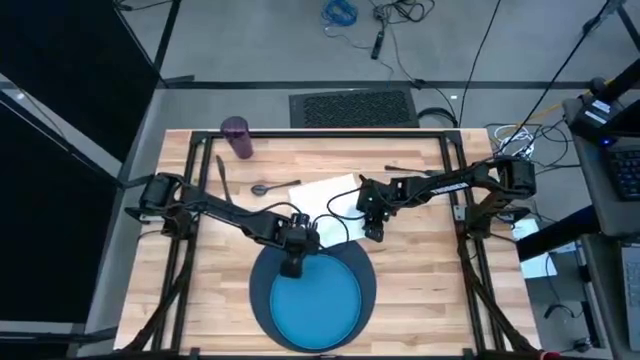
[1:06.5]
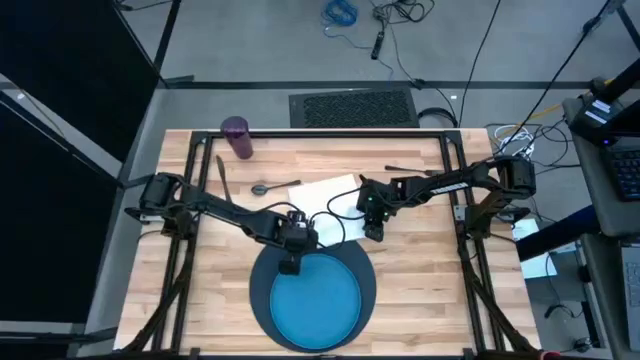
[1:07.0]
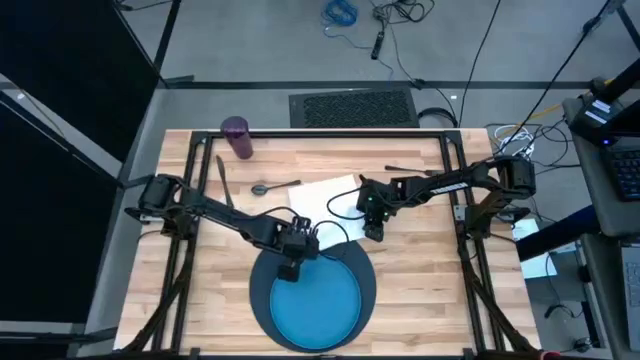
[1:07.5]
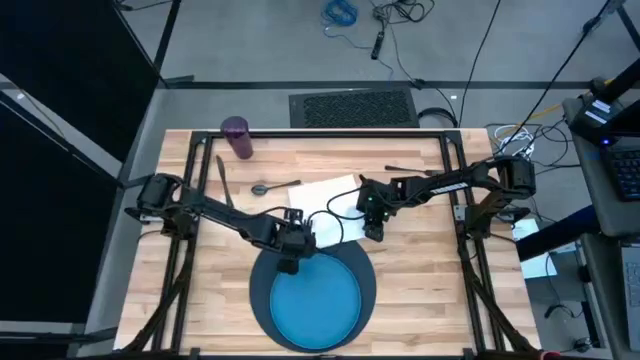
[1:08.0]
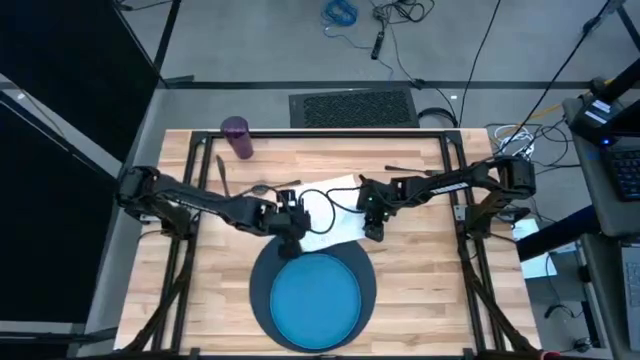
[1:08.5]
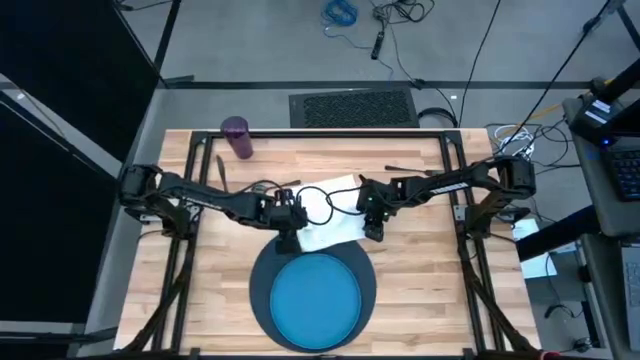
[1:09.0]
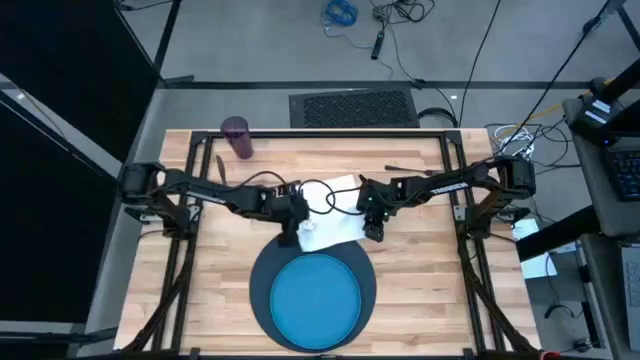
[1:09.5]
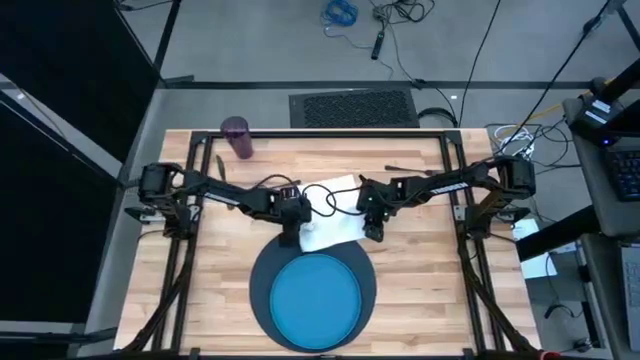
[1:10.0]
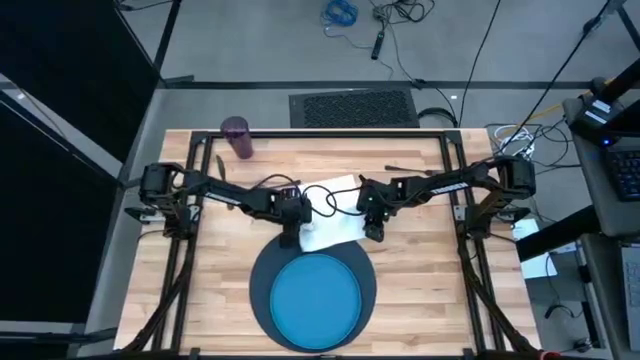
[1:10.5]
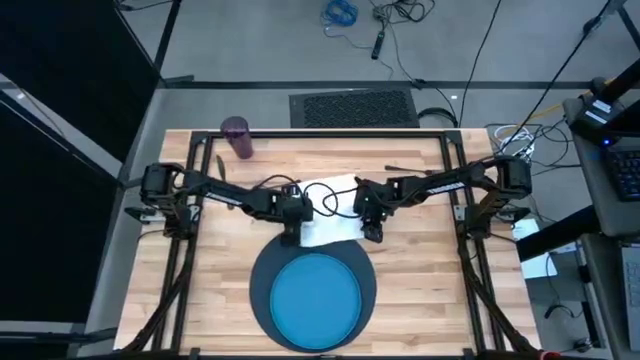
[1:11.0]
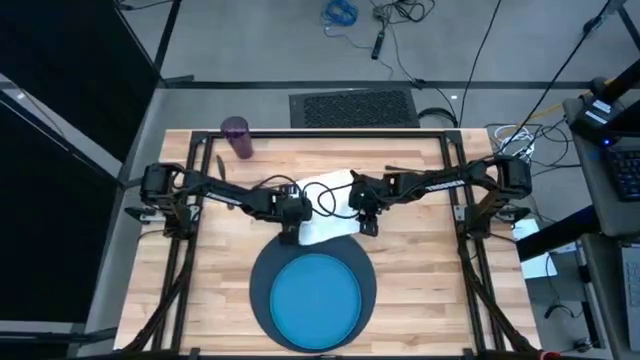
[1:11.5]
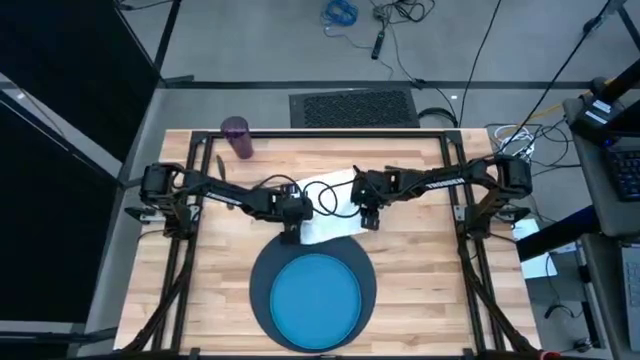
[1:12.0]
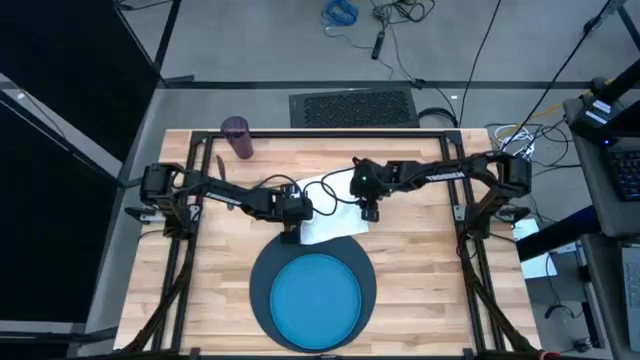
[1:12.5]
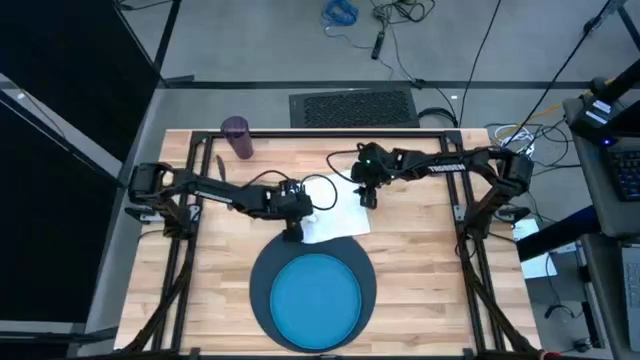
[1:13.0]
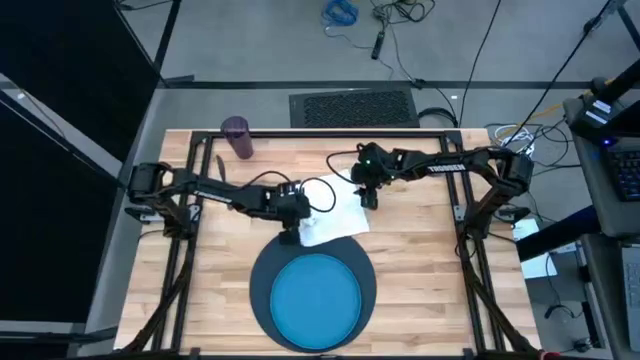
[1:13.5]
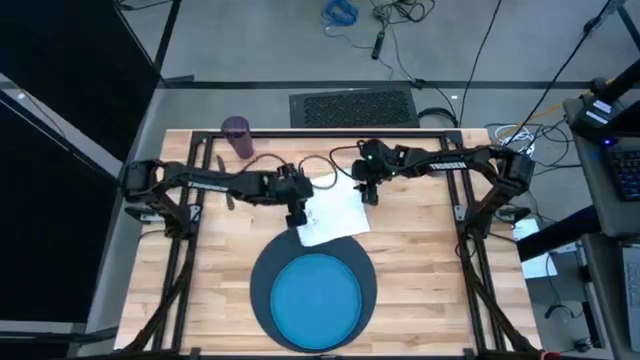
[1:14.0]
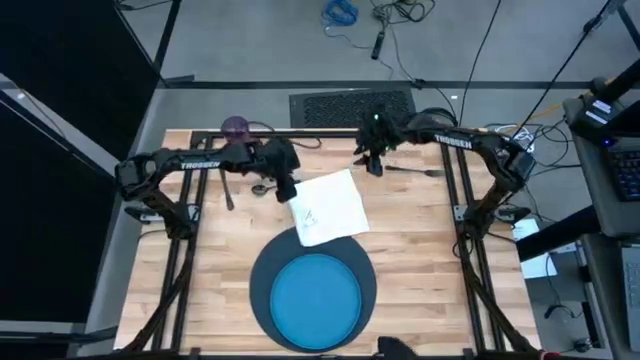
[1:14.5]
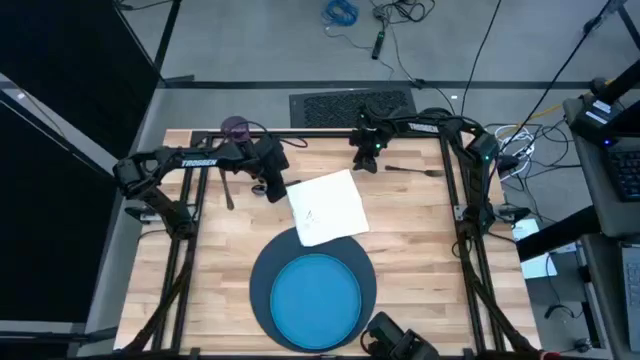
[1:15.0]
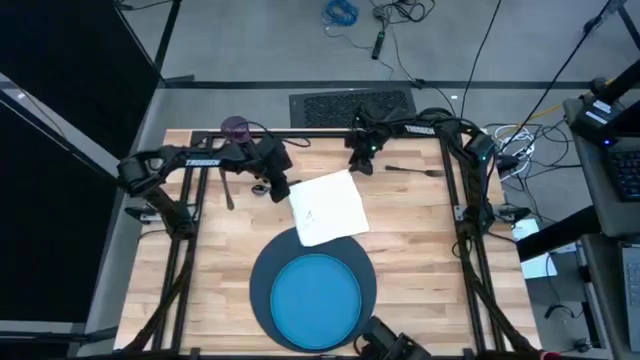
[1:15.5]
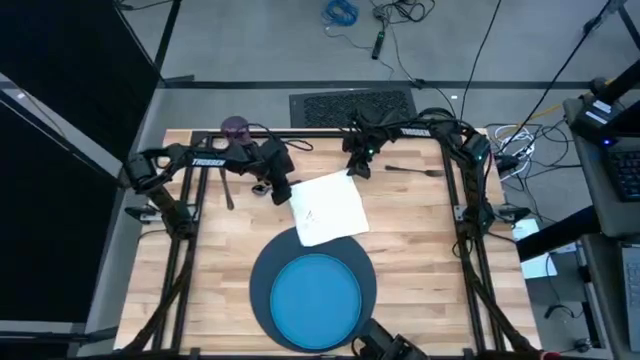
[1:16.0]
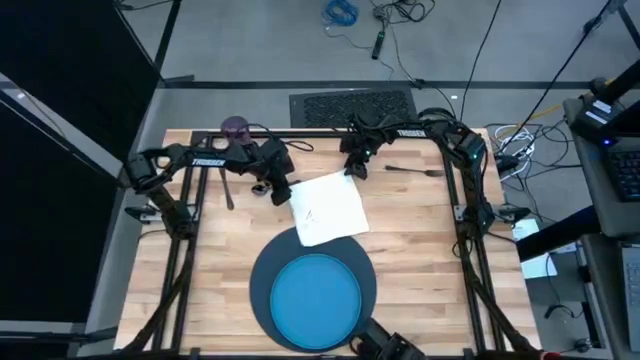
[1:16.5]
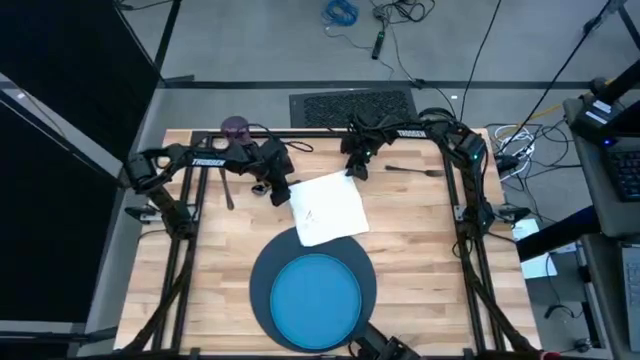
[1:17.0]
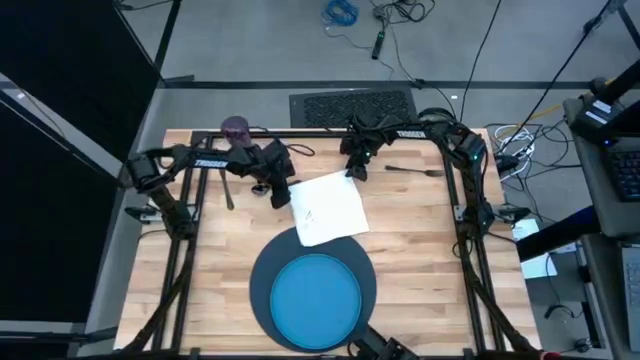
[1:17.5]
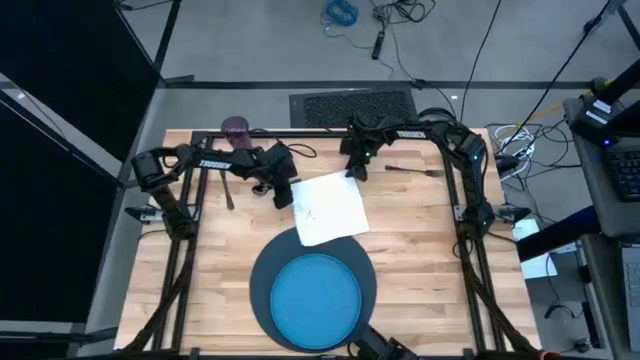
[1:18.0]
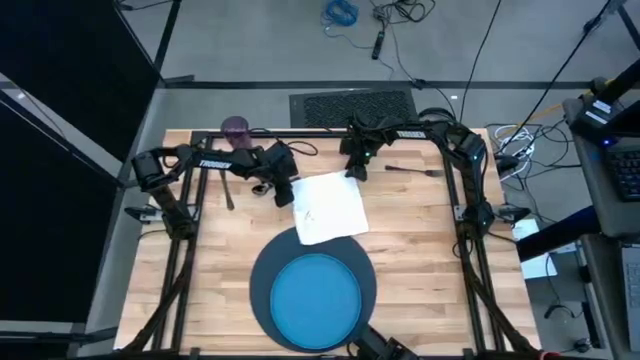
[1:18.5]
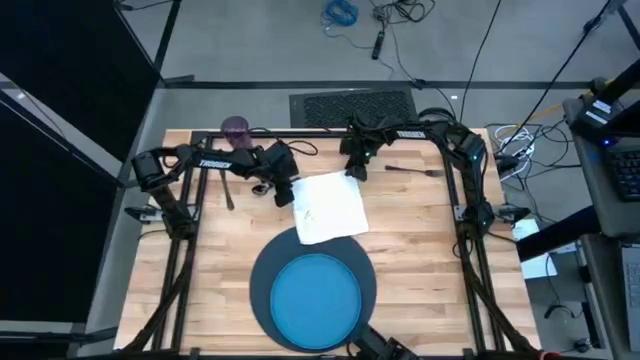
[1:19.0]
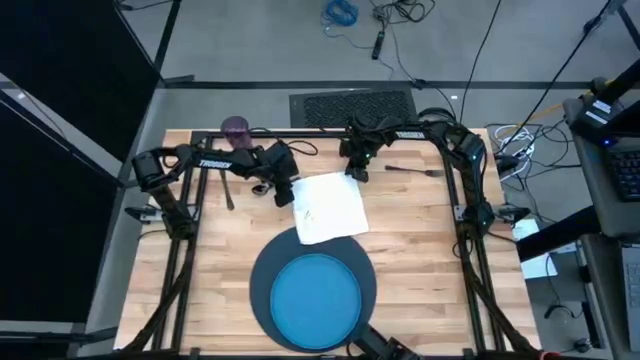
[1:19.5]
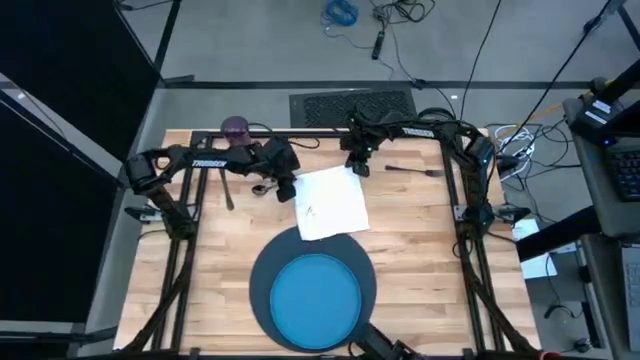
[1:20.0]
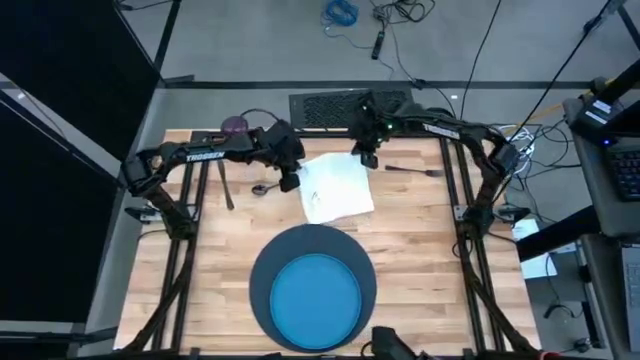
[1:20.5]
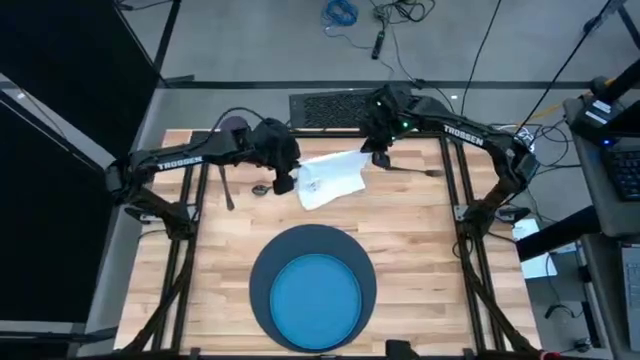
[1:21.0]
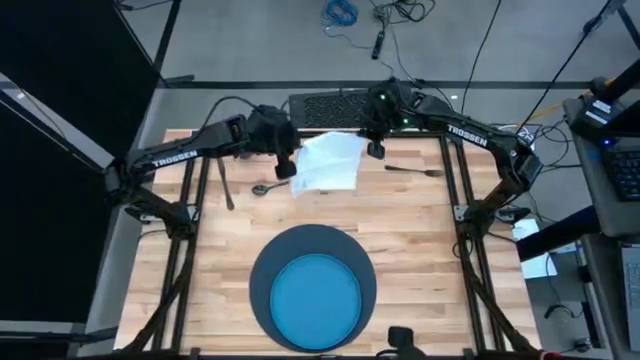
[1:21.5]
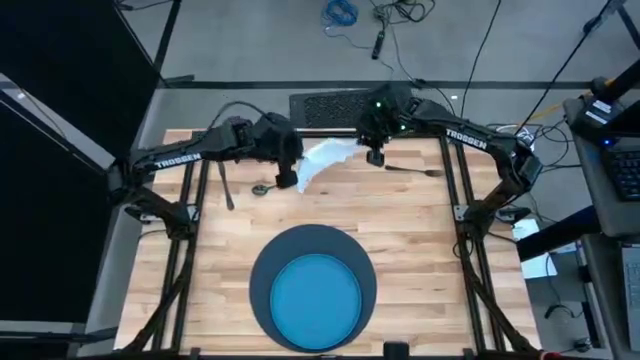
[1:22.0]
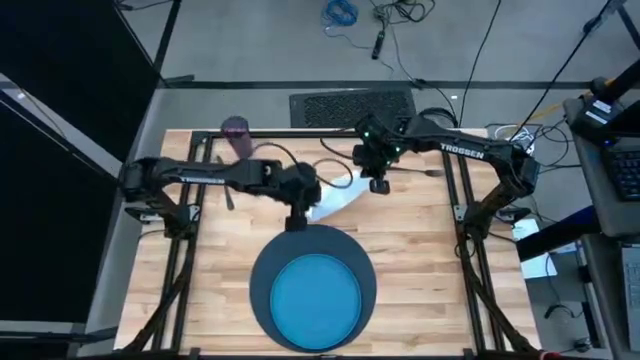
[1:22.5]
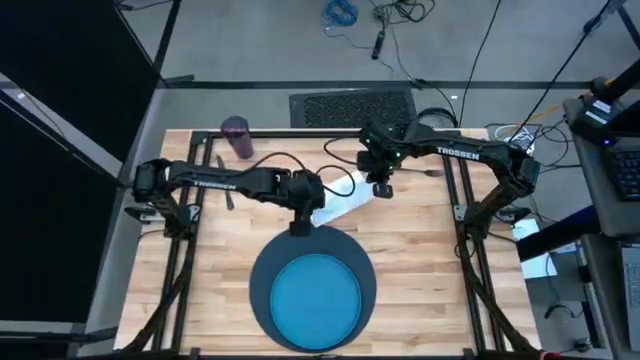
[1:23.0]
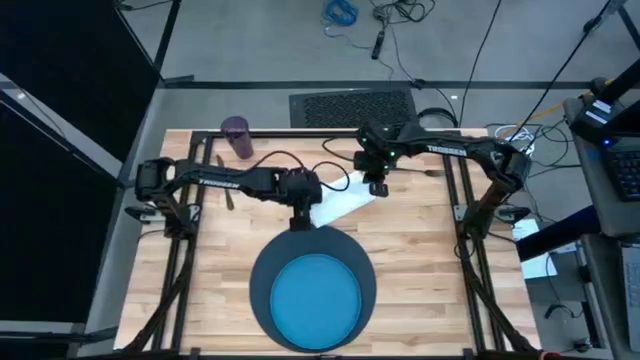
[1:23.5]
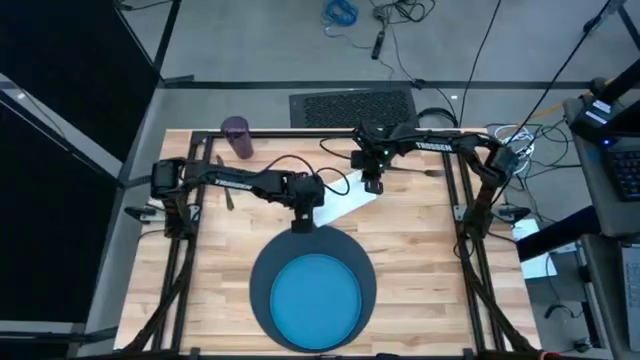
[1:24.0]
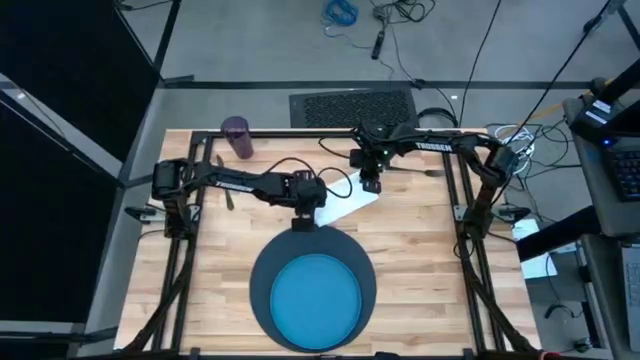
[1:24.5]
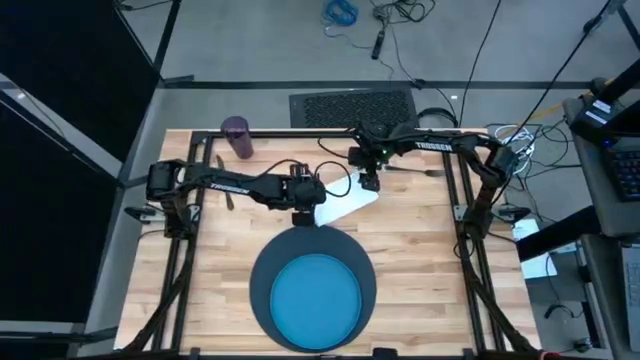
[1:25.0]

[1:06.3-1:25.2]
Task: Set table place
Fold the white napkin

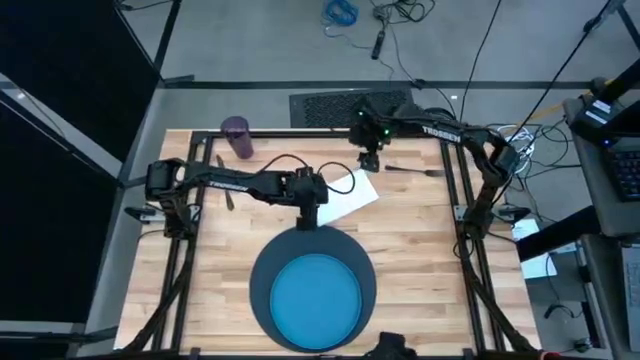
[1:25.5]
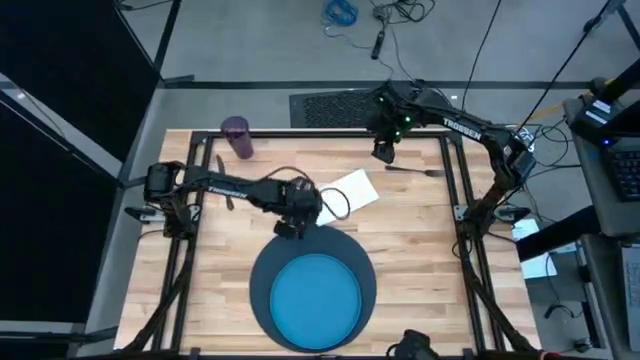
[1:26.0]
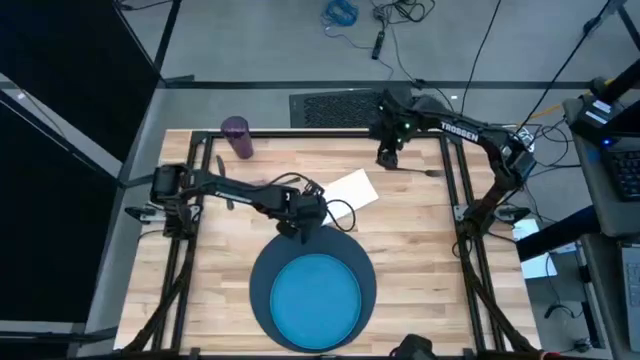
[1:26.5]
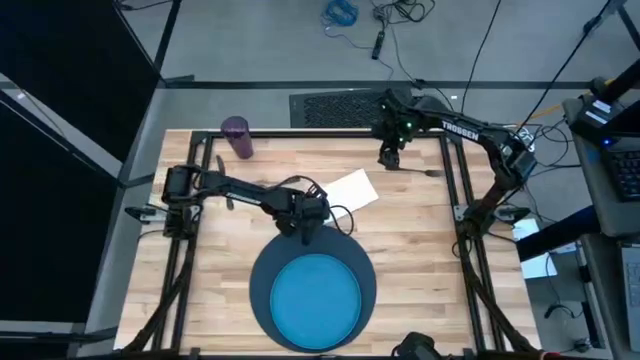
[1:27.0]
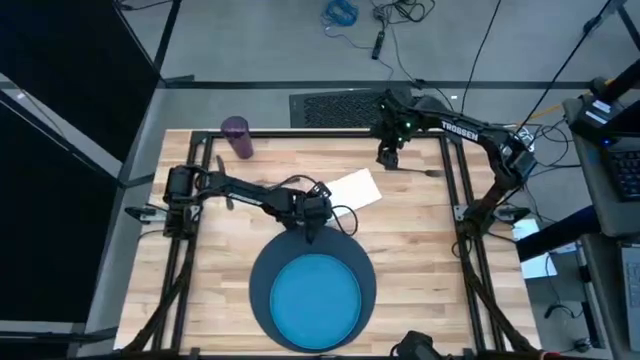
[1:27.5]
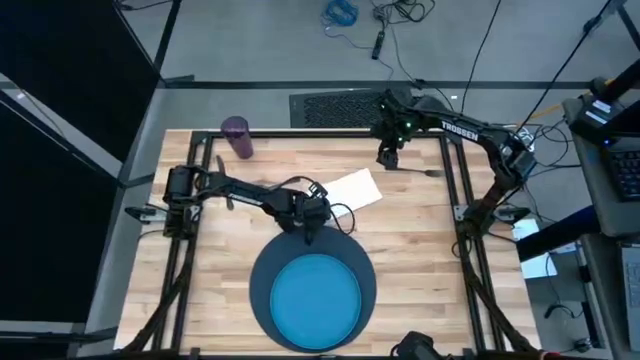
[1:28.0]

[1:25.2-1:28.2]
Move the white napkin to the right side of the placemat
